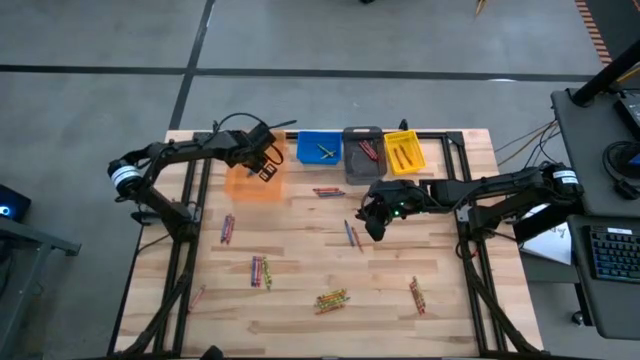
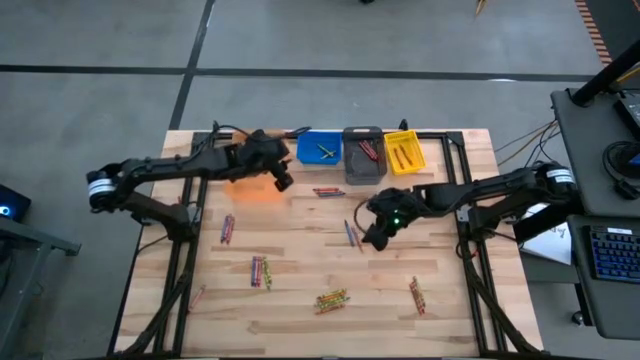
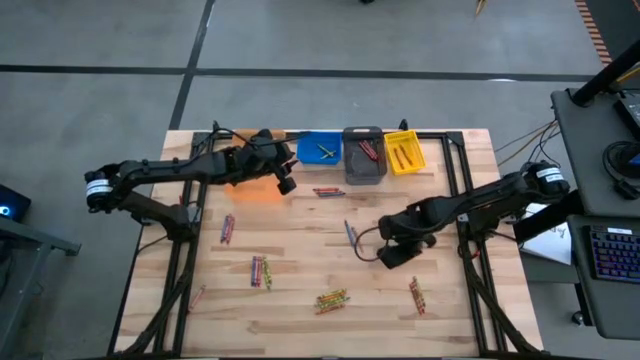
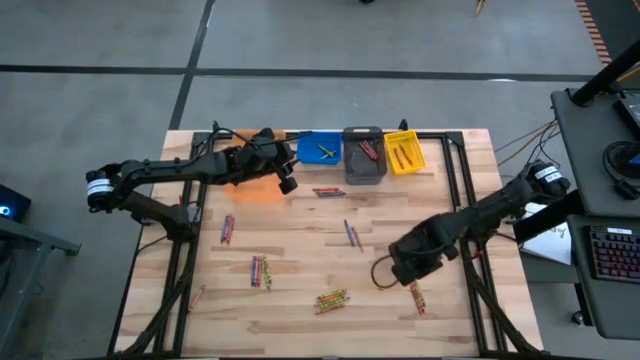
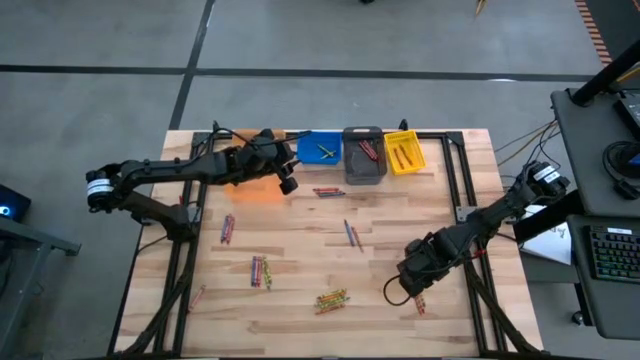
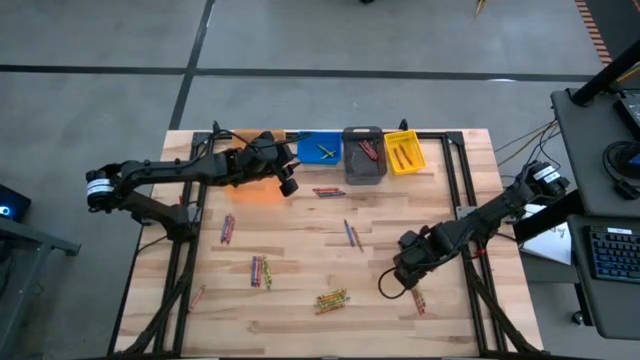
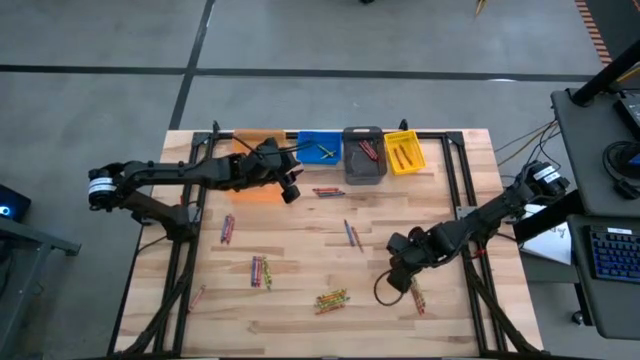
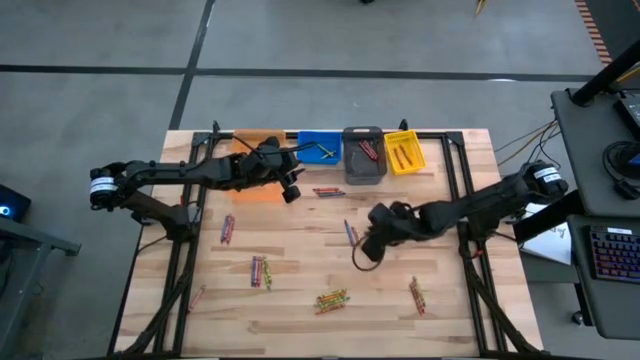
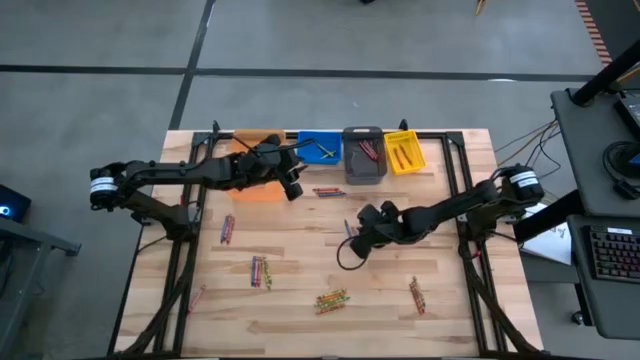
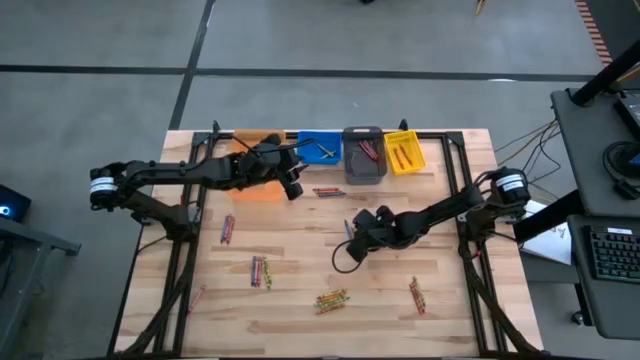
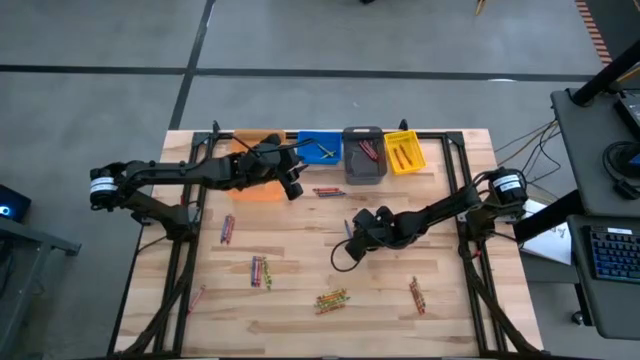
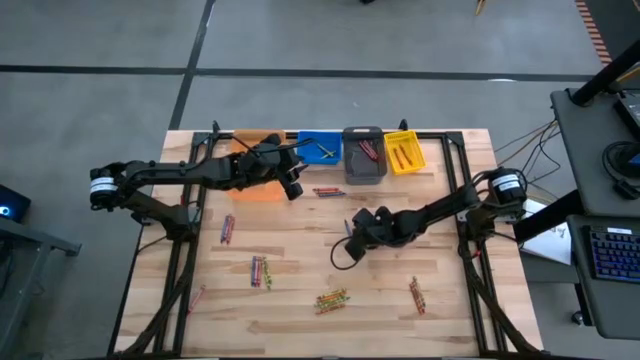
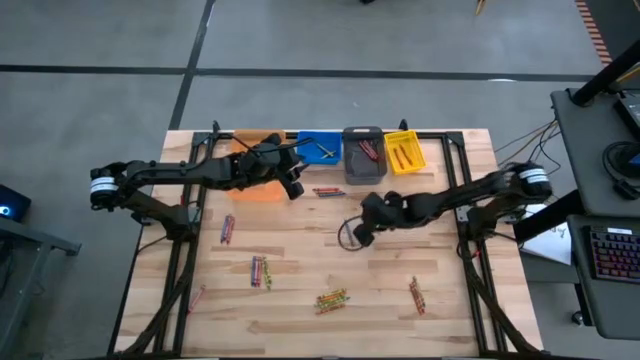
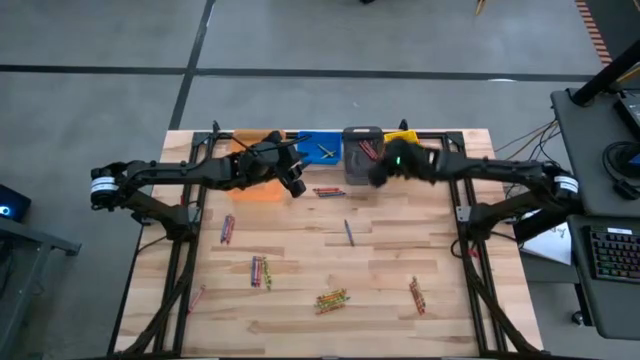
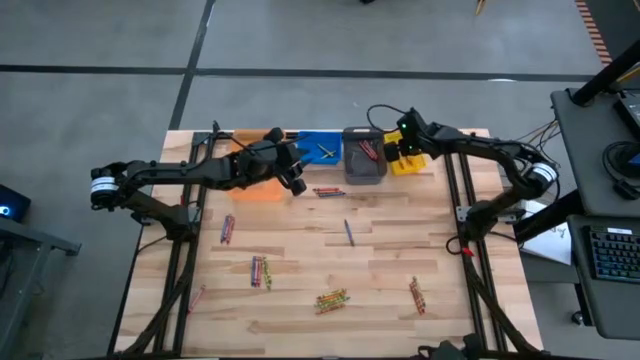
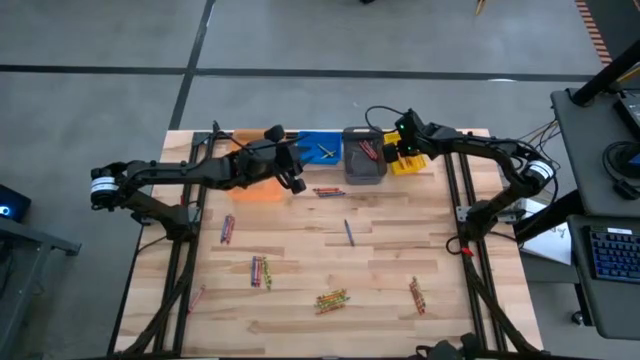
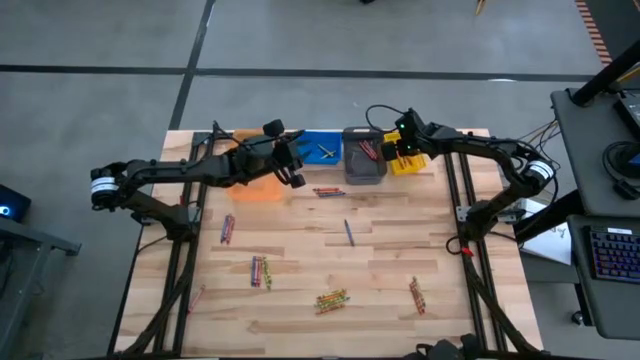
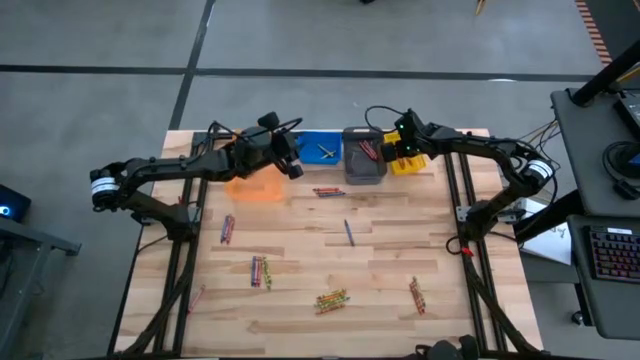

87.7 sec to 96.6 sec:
Task: Sort crayons
Put the orange crayon into the yellow bin

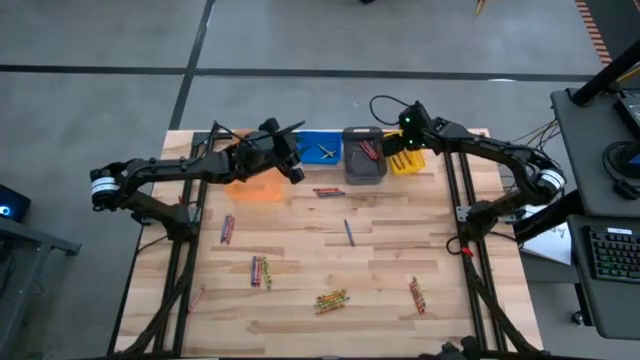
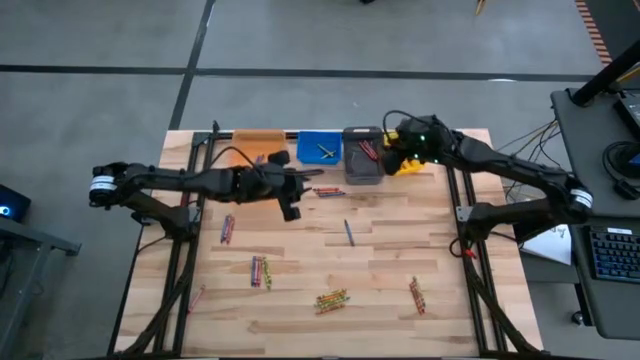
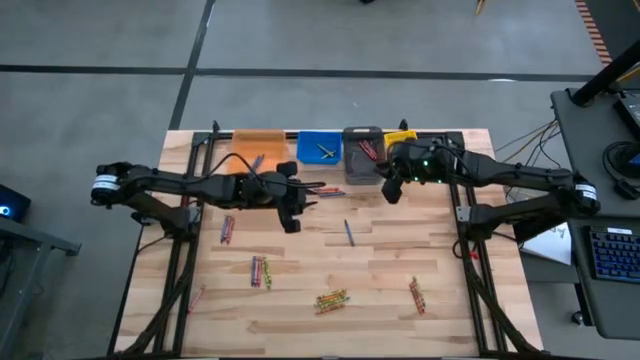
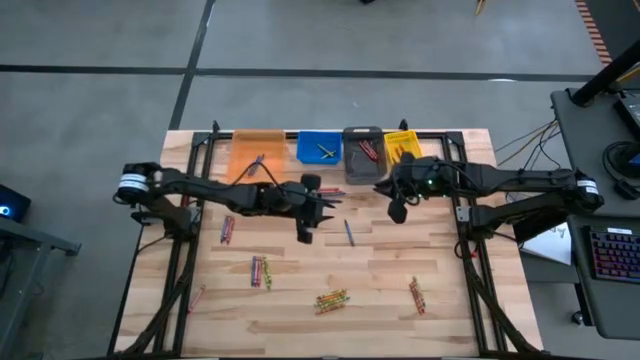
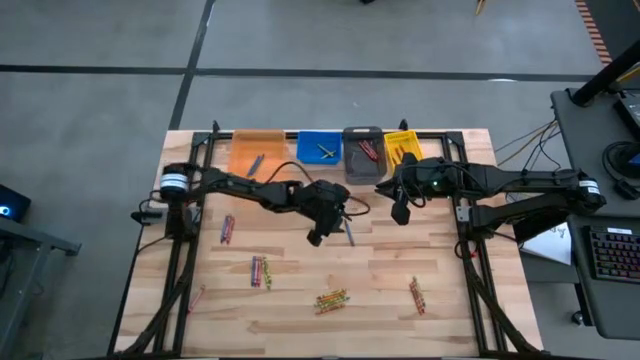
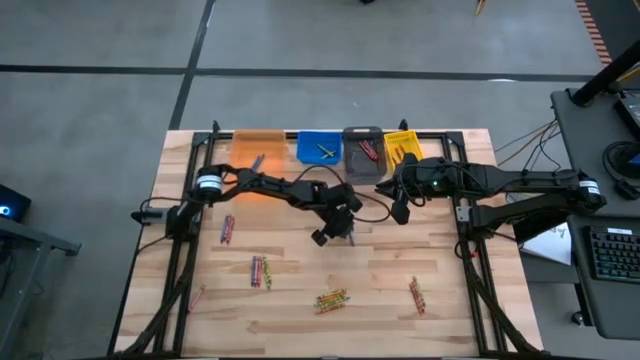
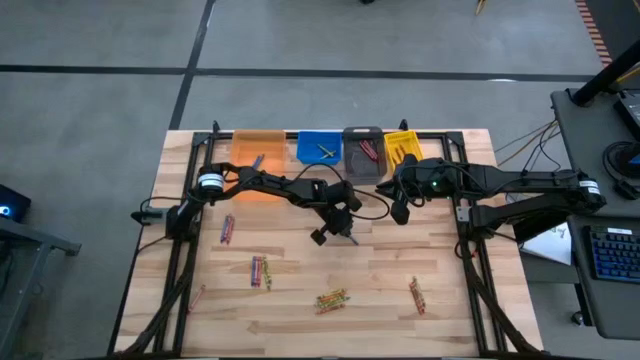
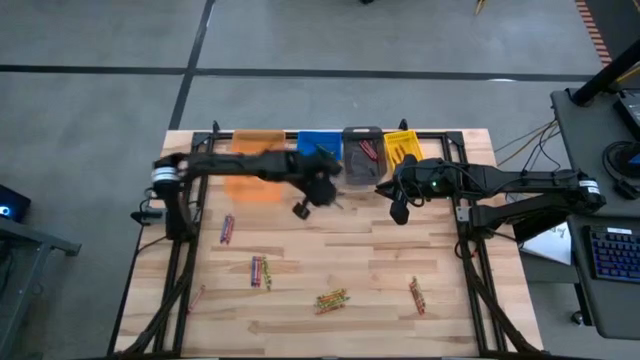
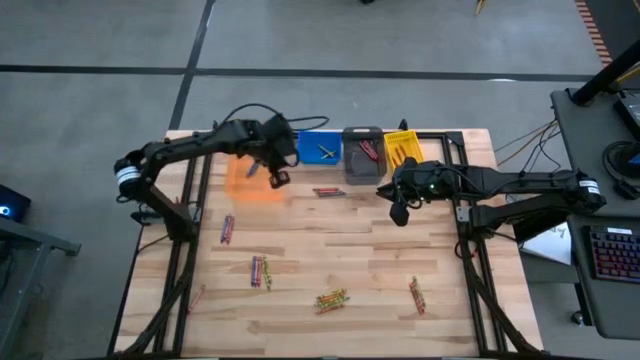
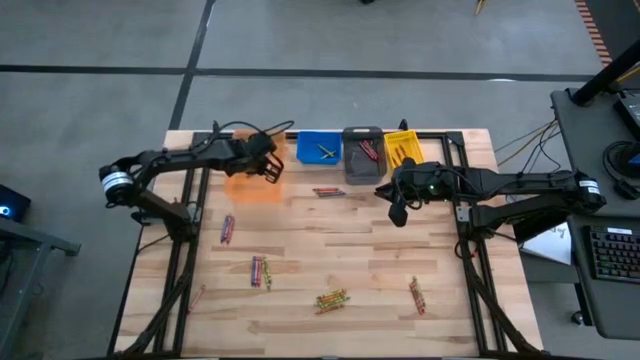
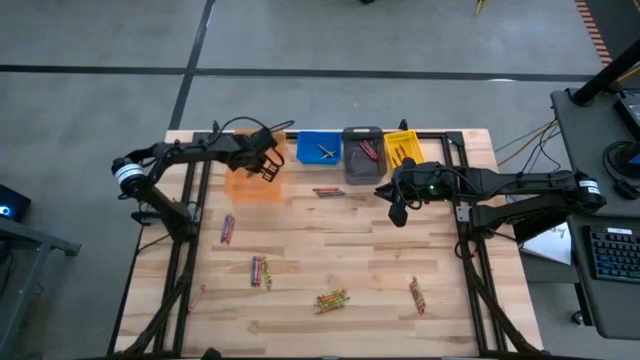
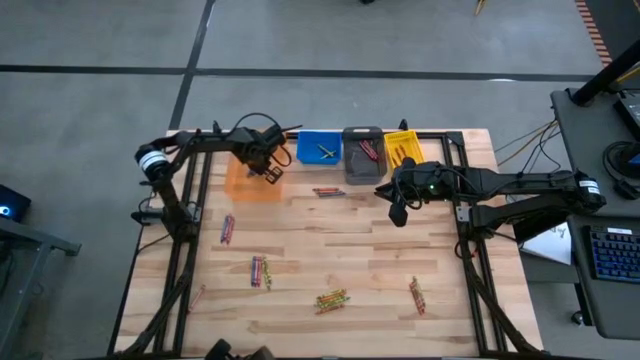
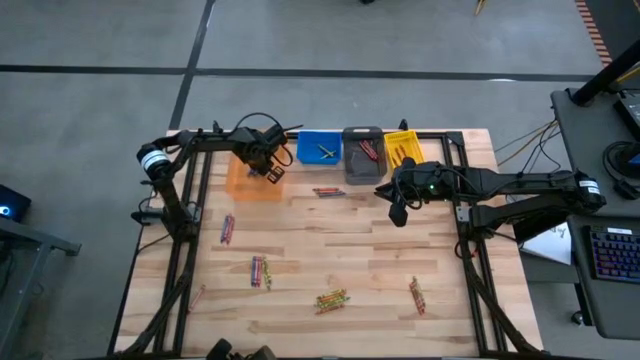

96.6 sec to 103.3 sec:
Put the blue crayon into the orange bin

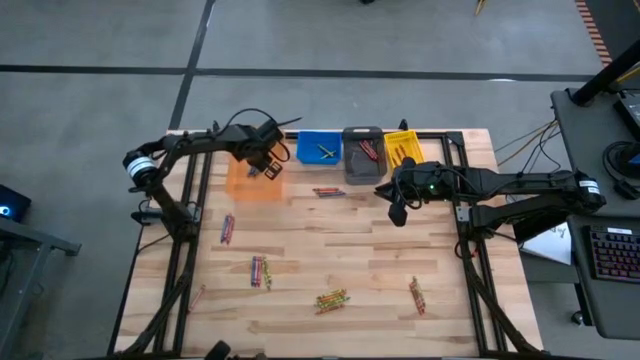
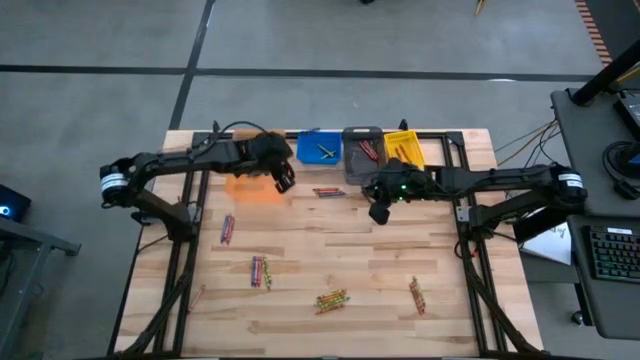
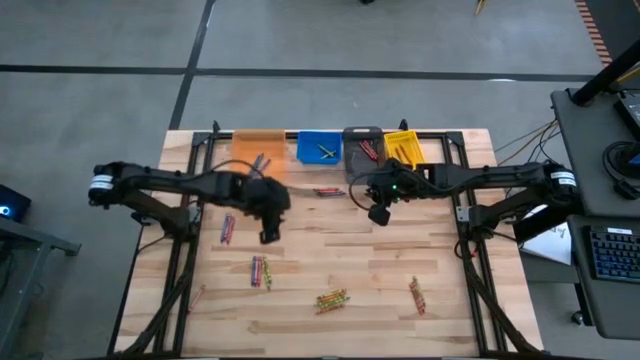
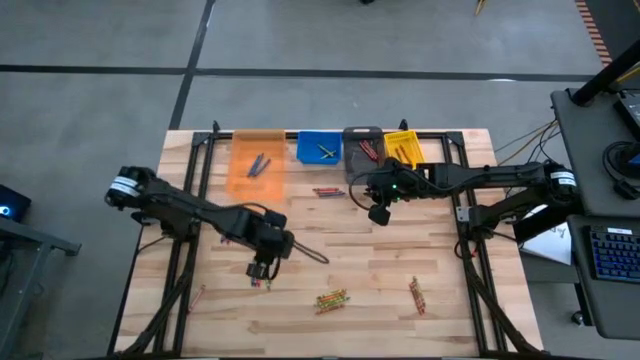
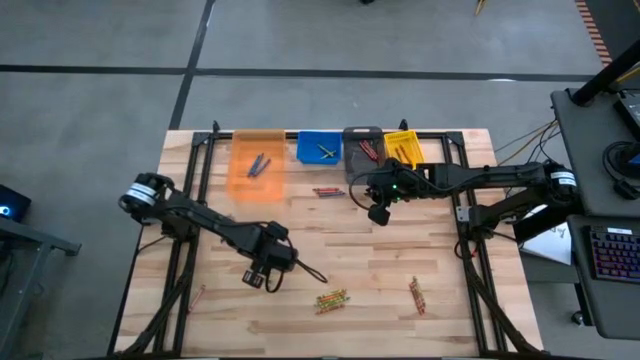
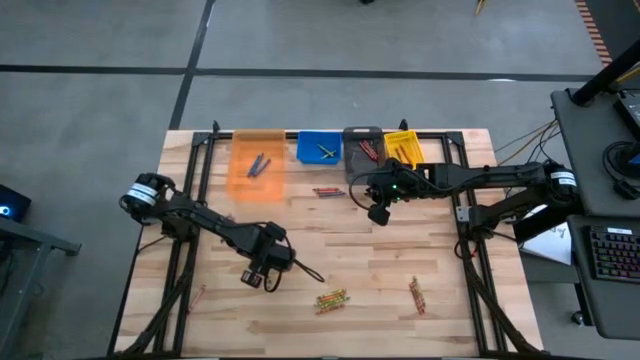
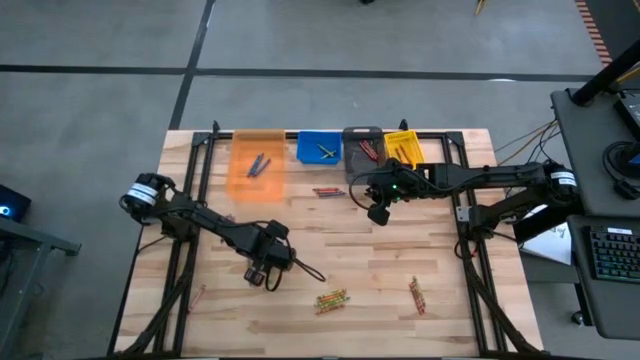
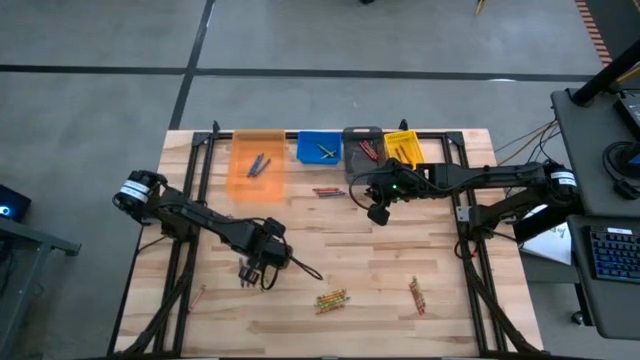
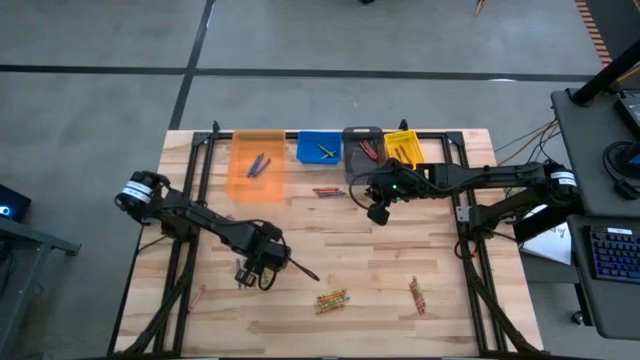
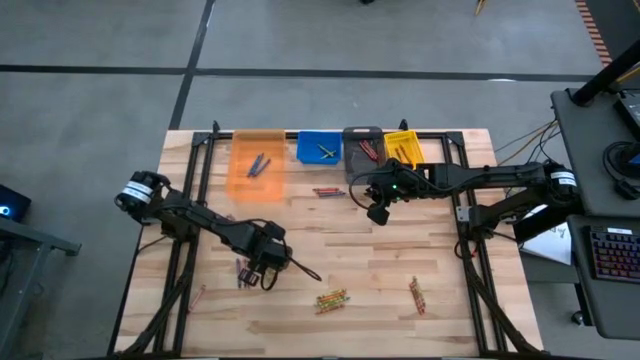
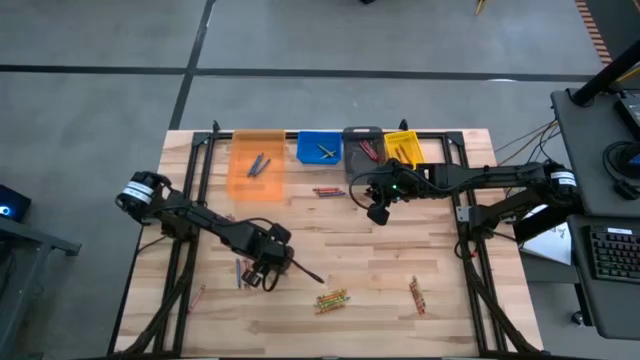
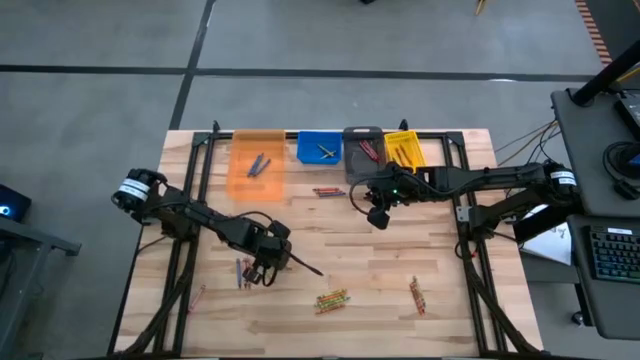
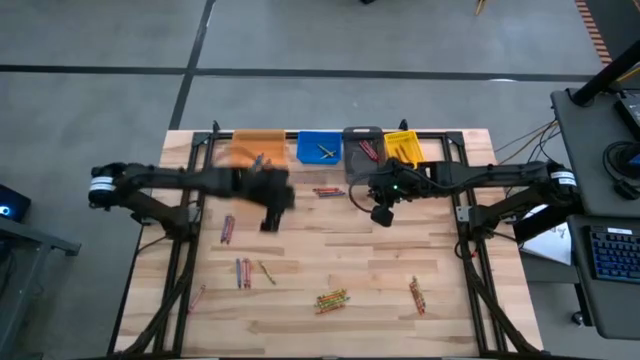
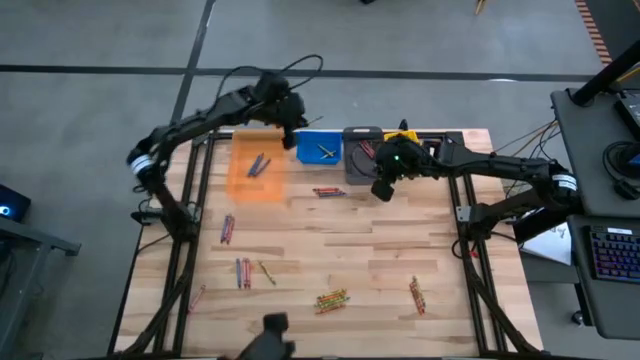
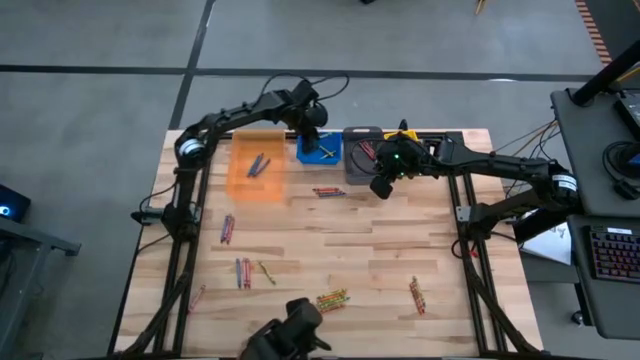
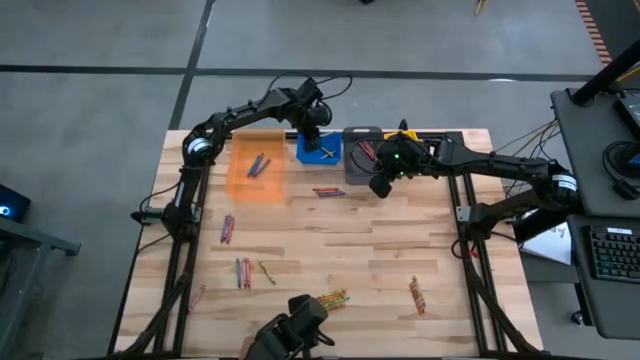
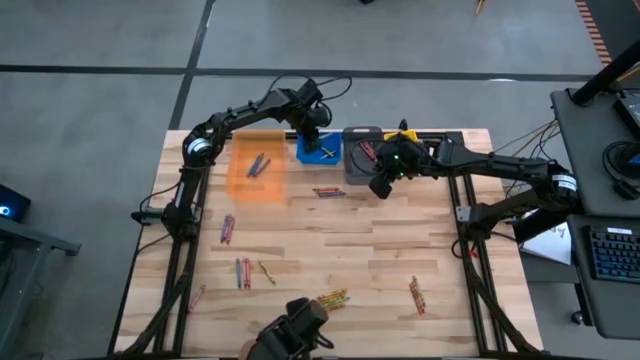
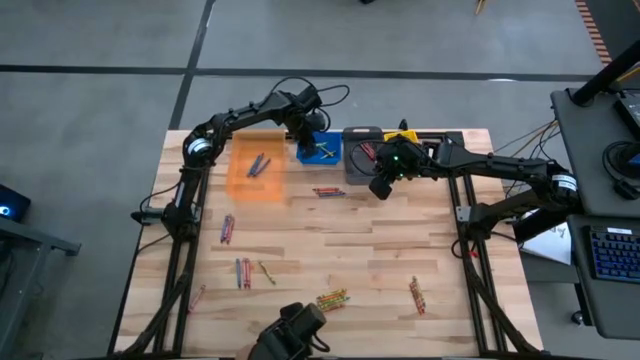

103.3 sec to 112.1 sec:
Put the green crayon into the blue bin
